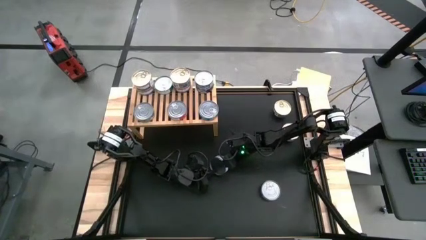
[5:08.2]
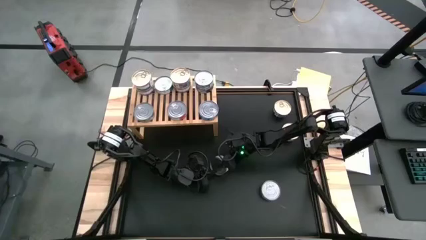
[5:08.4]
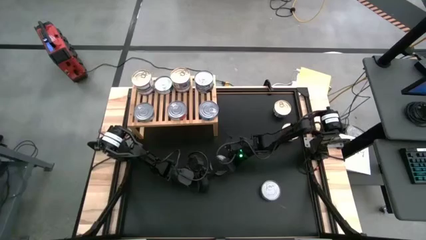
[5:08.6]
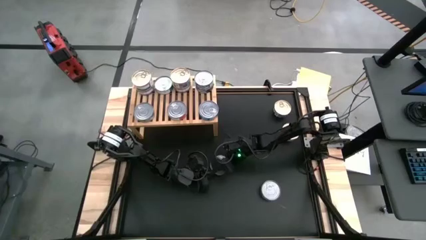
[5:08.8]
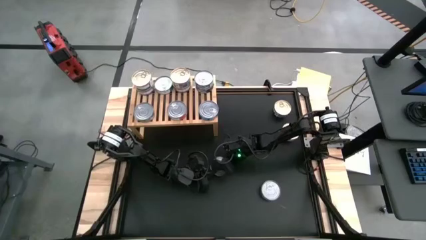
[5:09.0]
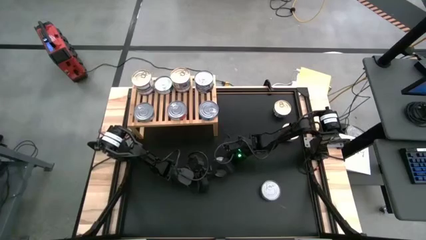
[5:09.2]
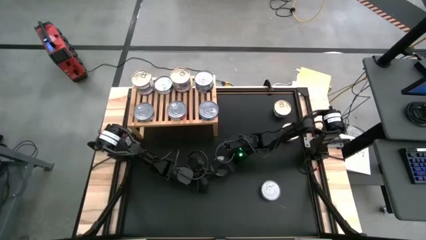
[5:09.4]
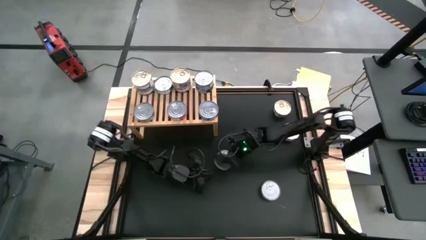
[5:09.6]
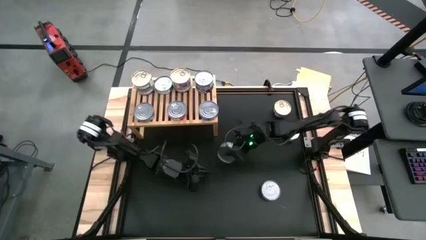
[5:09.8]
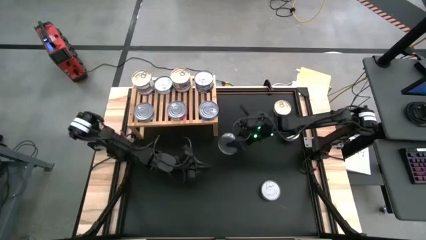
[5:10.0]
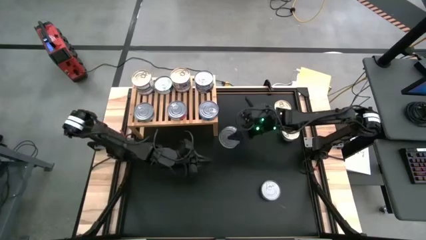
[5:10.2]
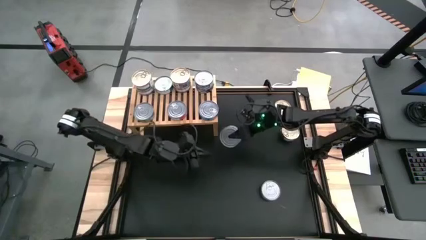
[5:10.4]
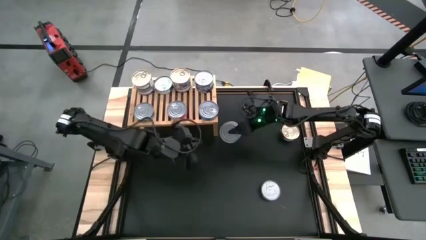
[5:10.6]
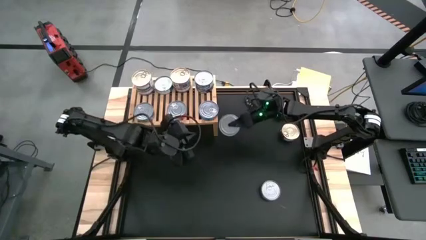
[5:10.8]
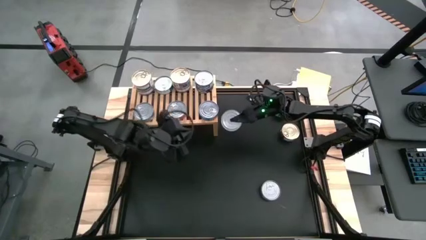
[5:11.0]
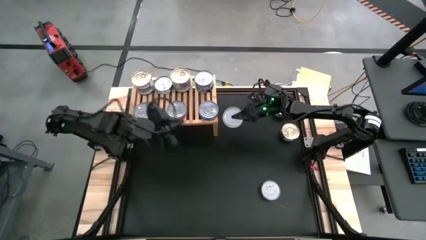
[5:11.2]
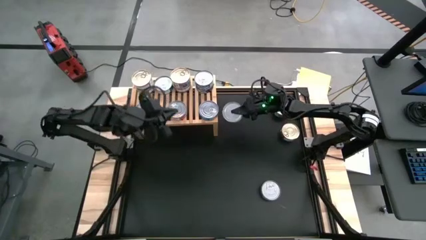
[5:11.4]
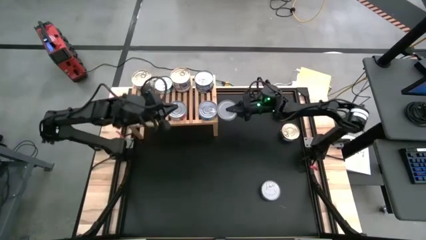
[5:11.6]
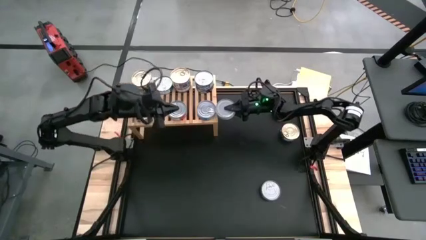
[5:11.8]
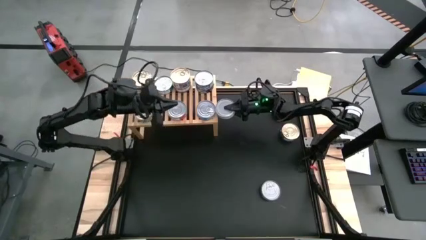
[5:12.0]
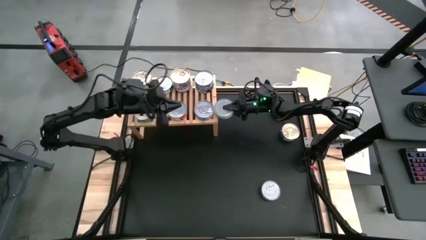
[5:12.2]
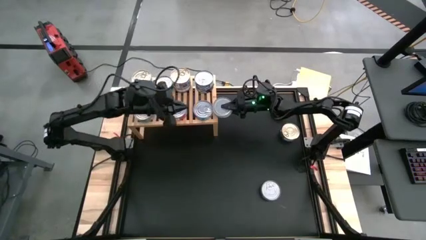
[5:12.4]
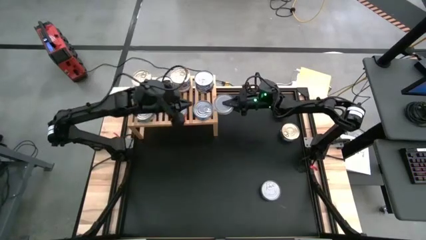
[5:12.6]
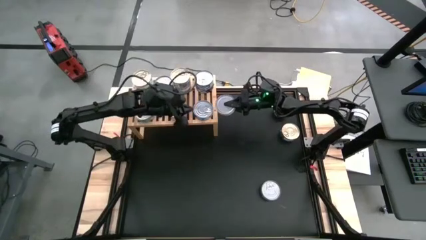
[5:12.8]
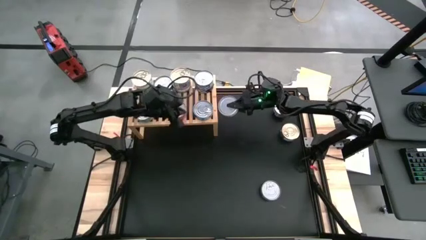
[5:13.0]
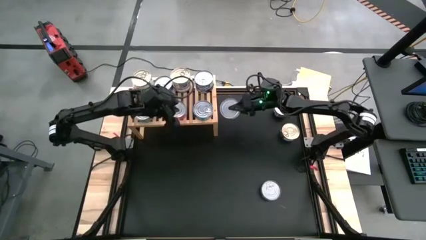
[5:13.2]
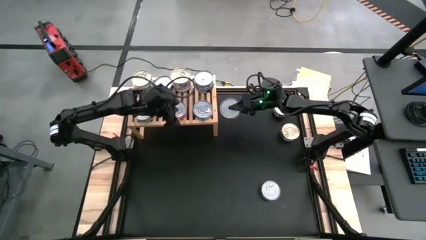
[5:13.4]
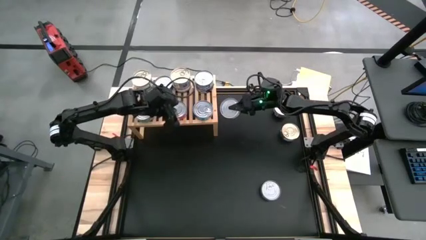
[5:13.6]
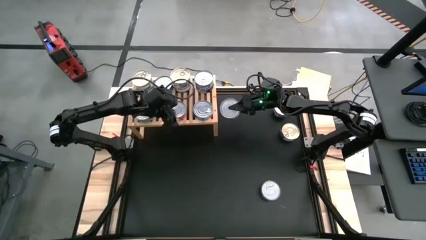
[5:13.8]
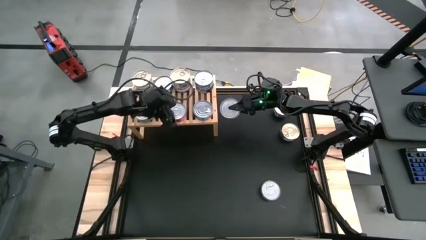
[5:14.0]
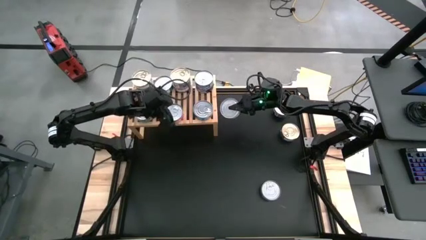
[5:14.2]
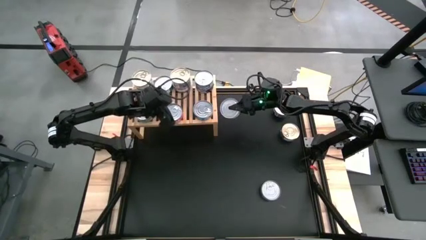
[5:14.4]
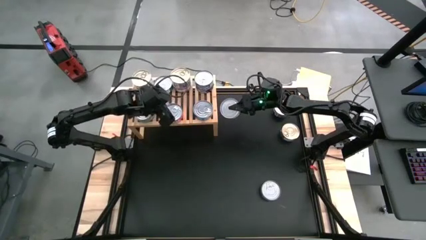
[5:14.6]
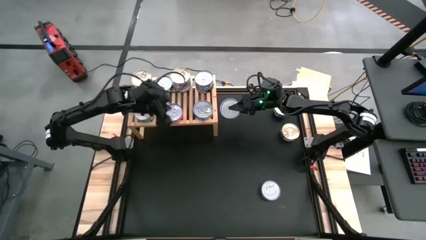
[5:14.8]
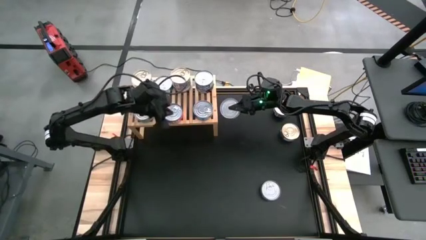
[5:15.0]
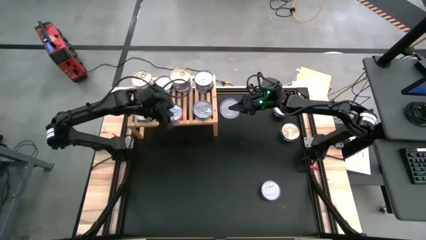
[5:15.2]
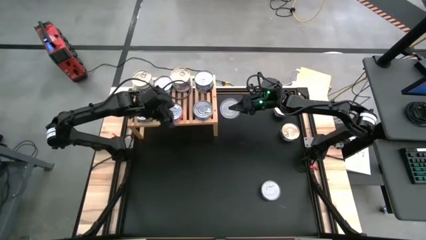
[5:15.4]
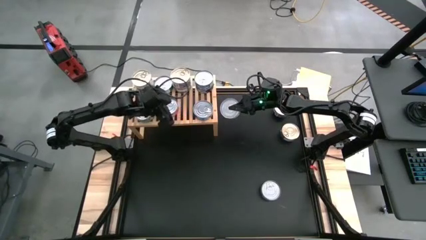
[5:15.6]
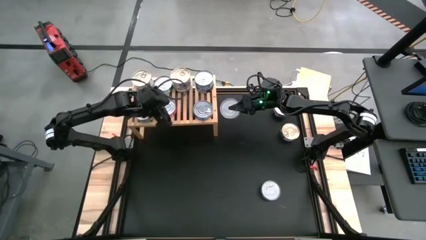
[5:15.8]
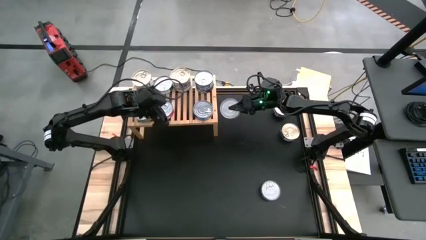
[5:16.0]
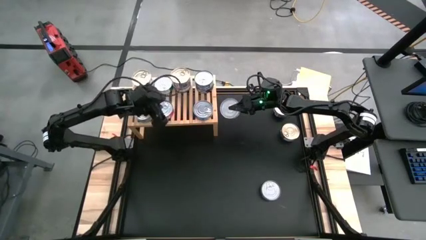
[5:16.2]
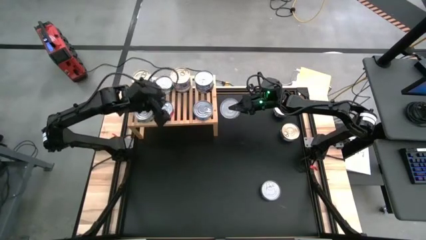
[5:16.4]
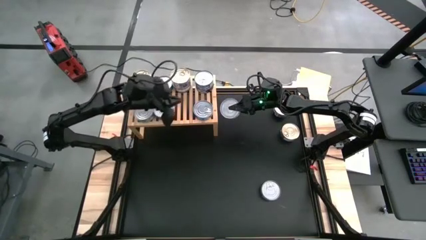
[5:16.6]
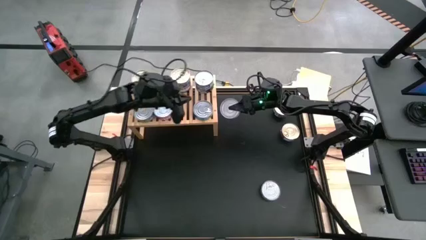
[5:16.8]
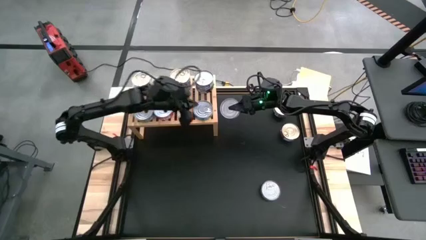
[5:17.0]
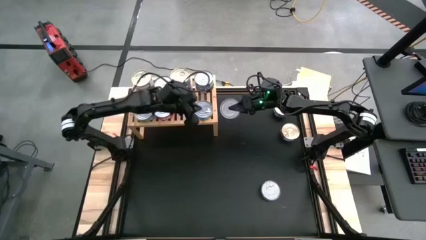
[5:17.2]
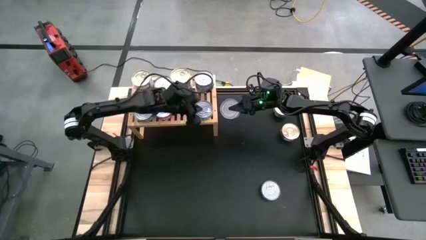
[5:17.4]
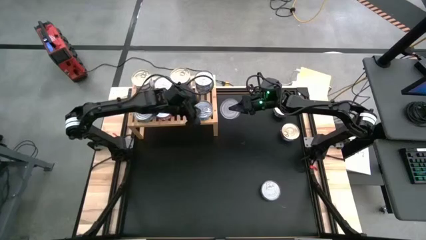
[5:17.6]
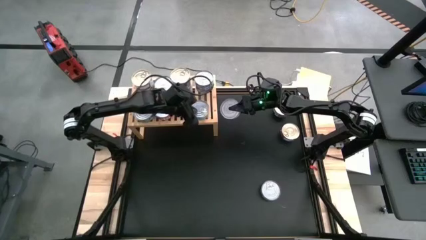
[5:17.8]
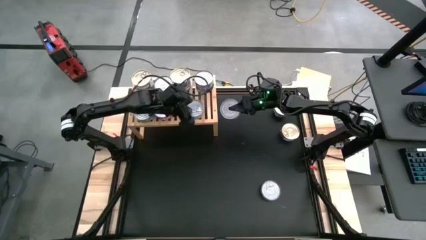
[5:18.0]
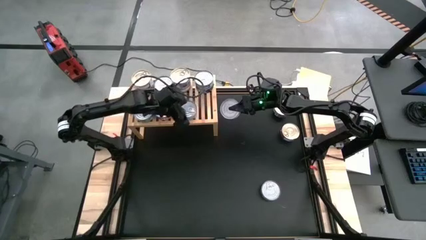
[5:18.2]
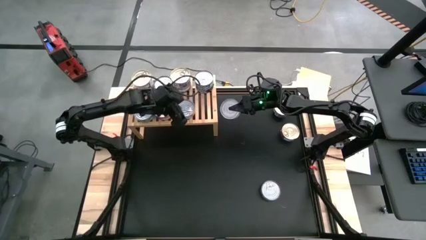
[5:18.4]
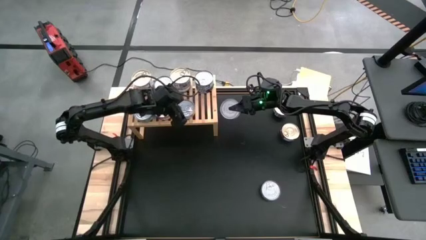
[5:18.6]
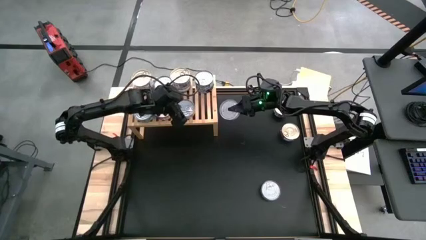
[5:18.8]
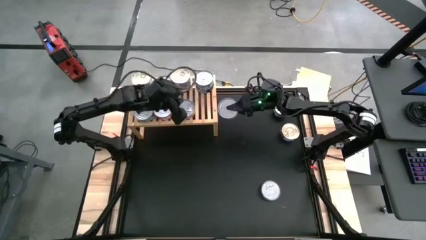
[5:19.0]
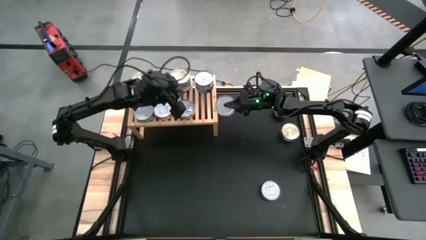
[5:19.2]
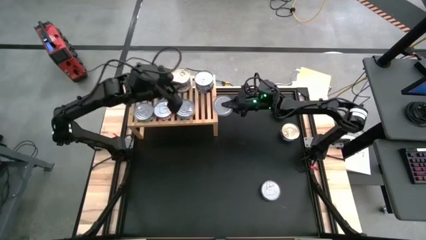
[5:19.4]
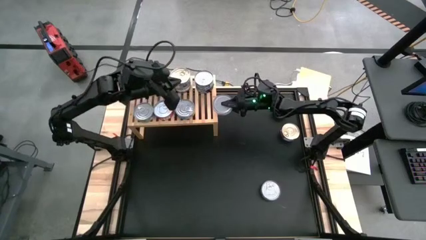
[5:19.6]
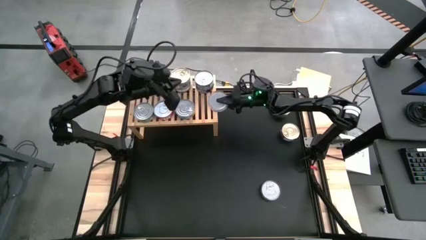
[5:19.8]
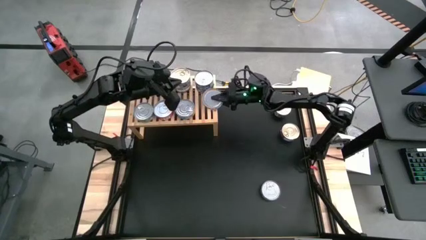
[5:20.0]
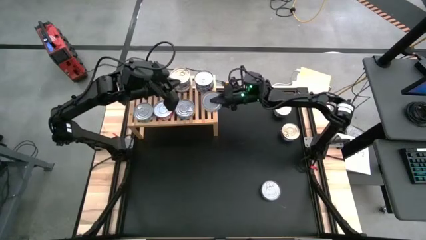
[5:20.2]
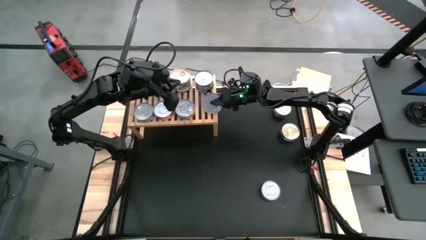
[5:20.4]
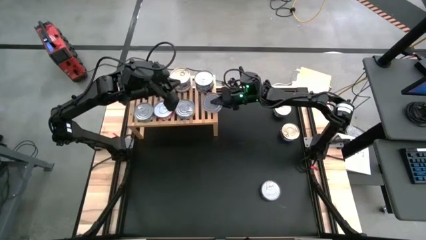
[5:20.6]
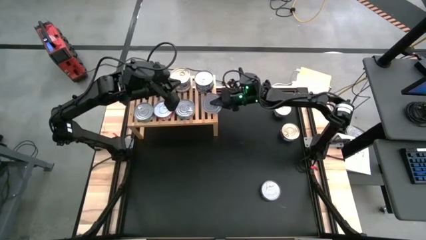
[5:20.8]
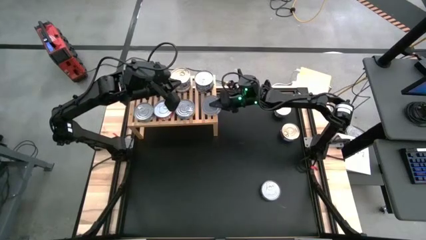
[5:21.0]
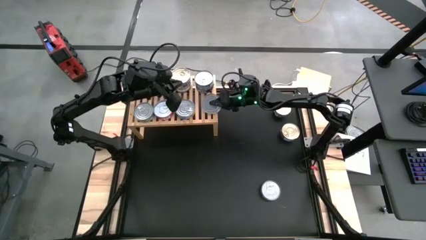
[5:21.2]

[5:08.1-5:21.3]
Task: Stack canned seafood by type on shelf
Put the green tuna can on the shelf
